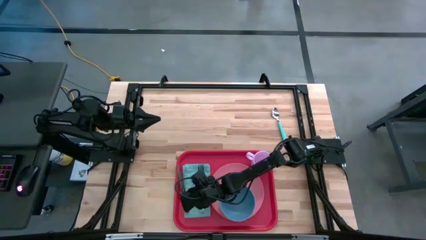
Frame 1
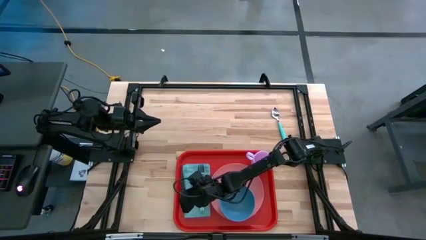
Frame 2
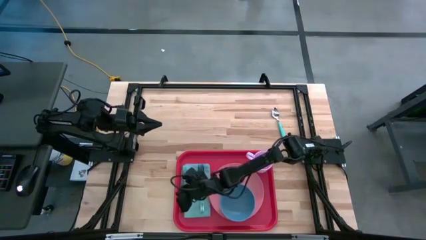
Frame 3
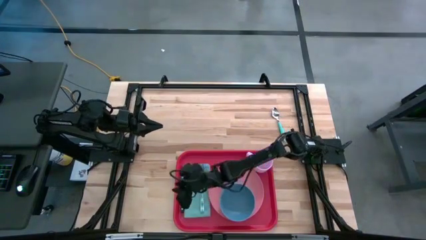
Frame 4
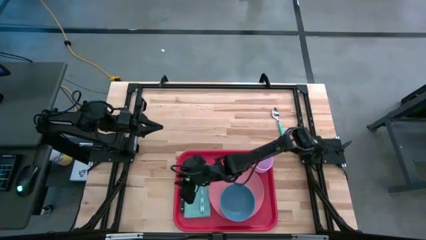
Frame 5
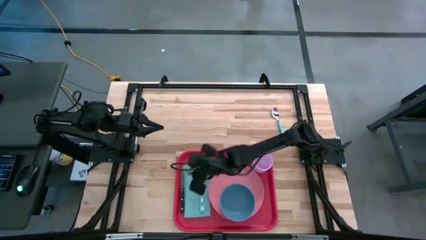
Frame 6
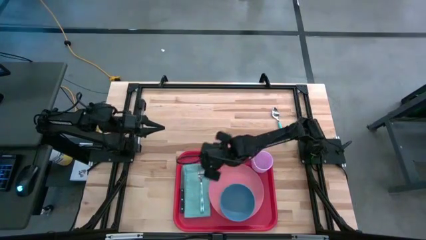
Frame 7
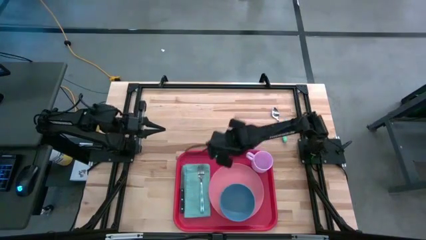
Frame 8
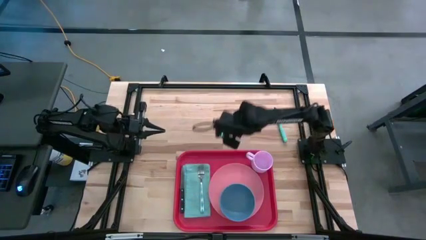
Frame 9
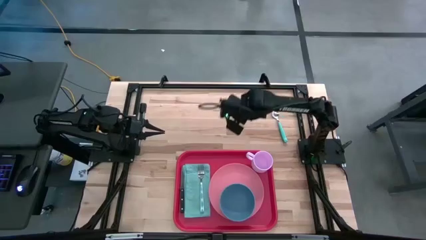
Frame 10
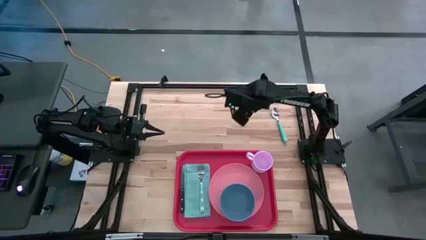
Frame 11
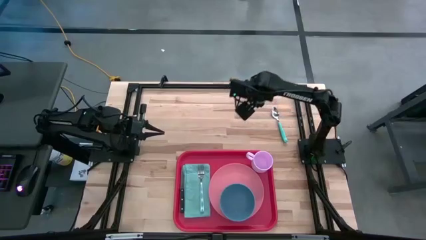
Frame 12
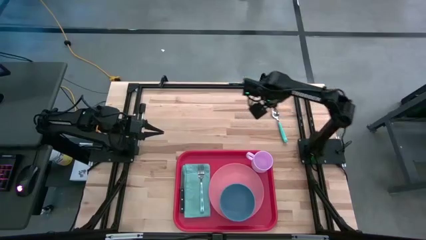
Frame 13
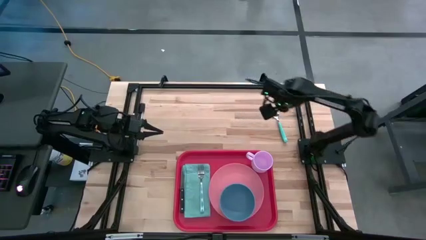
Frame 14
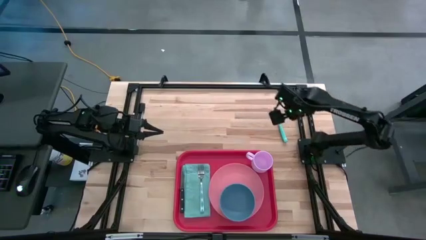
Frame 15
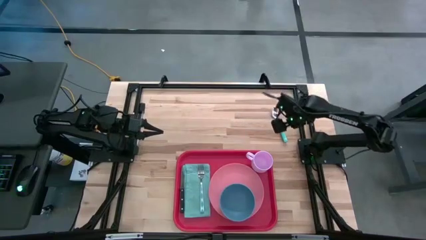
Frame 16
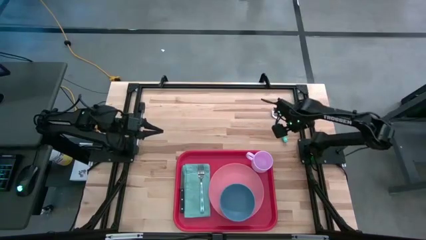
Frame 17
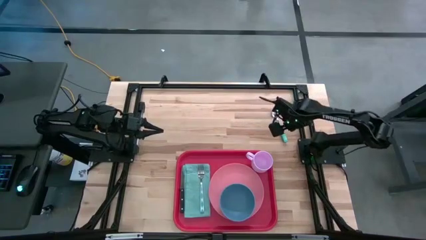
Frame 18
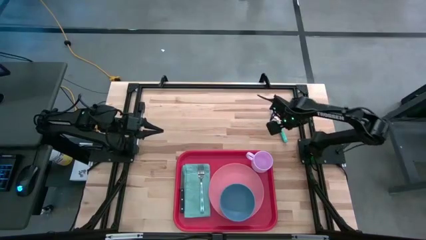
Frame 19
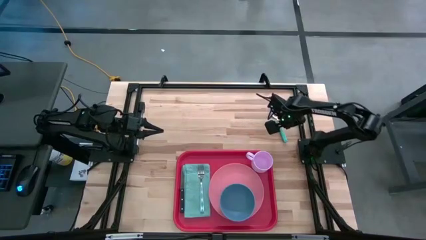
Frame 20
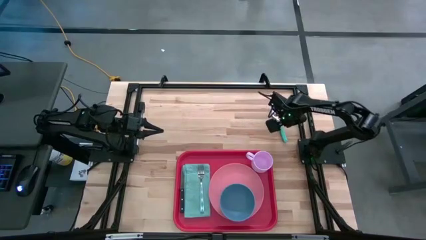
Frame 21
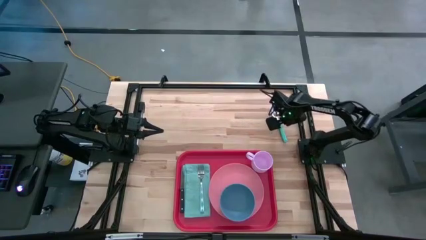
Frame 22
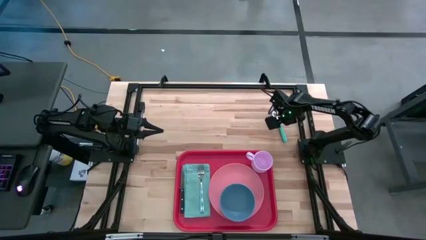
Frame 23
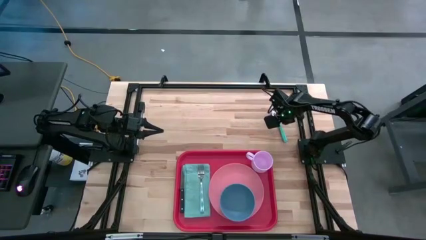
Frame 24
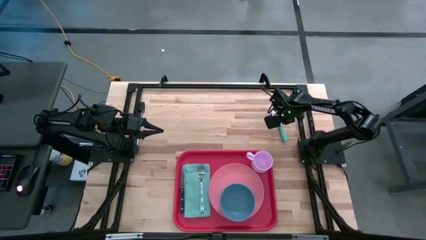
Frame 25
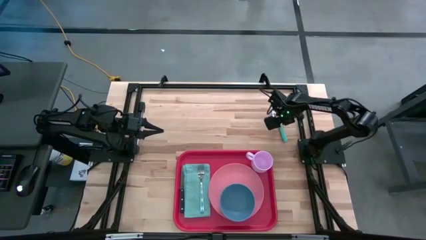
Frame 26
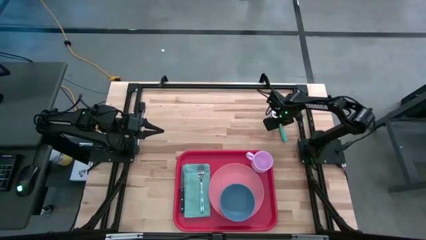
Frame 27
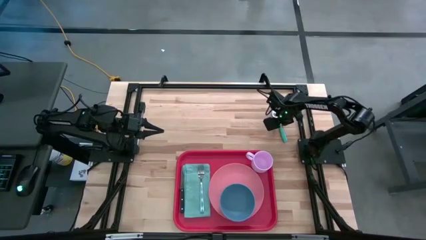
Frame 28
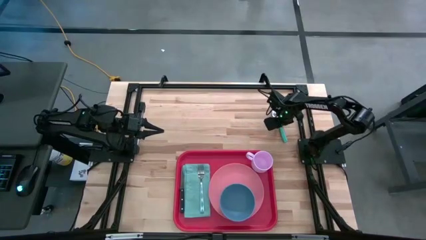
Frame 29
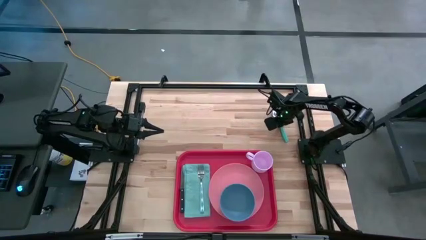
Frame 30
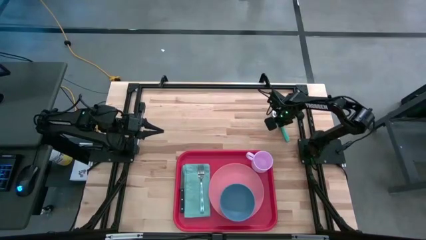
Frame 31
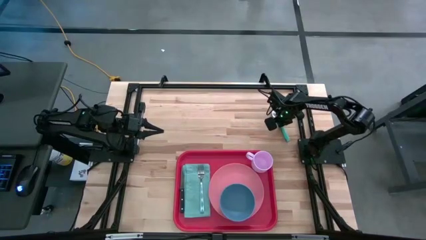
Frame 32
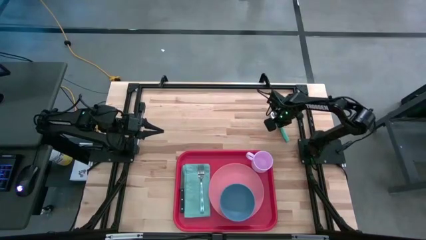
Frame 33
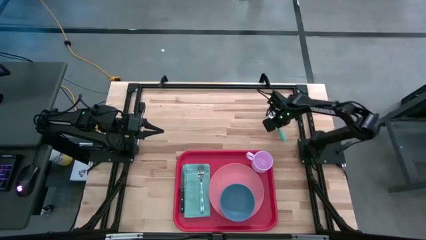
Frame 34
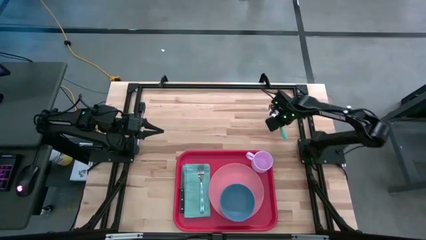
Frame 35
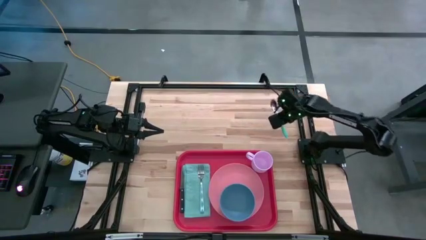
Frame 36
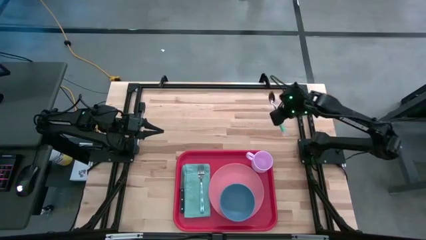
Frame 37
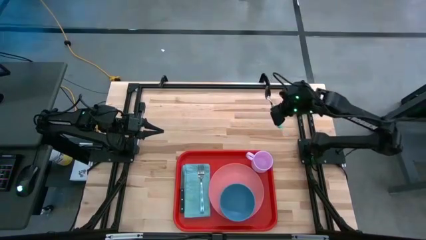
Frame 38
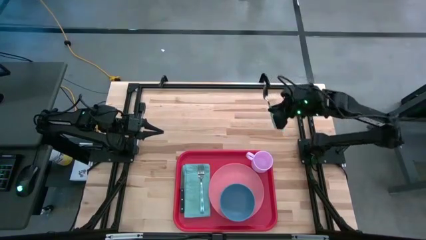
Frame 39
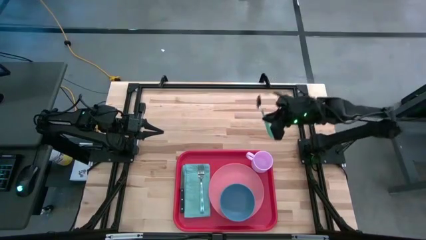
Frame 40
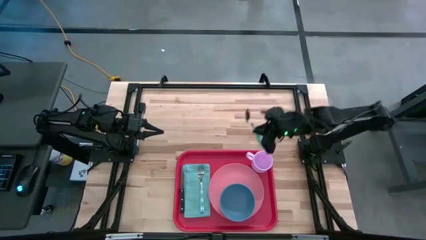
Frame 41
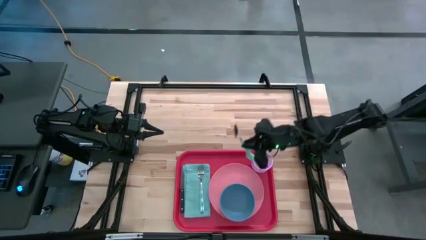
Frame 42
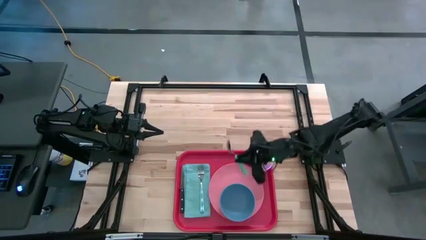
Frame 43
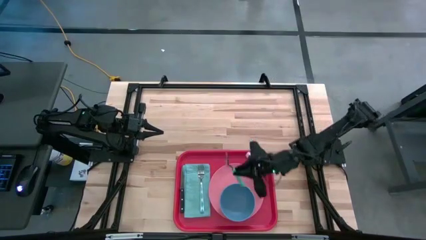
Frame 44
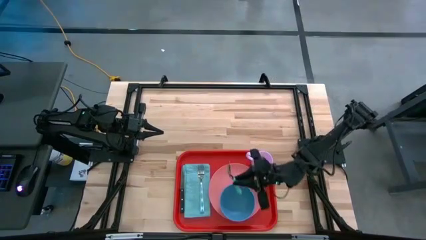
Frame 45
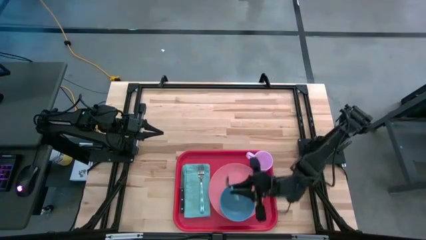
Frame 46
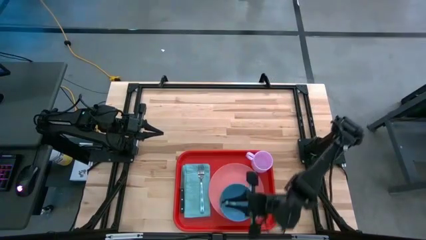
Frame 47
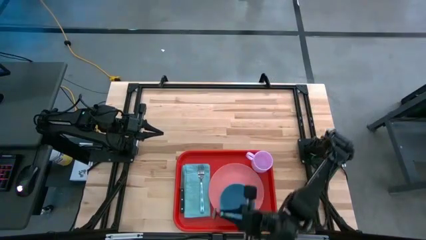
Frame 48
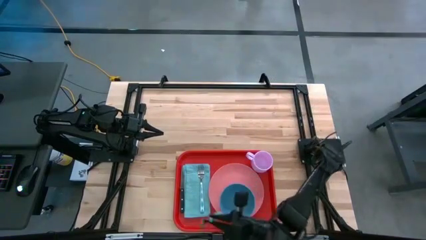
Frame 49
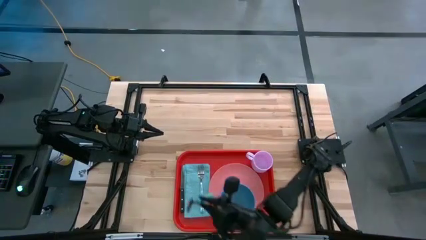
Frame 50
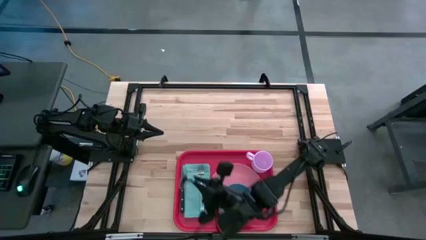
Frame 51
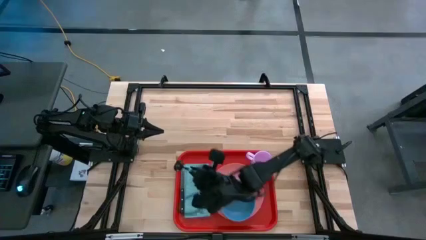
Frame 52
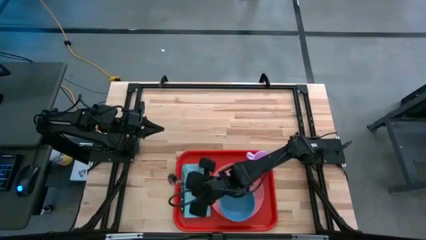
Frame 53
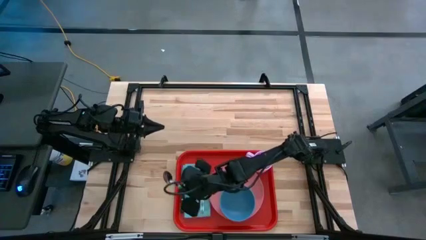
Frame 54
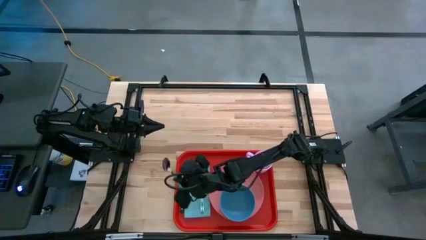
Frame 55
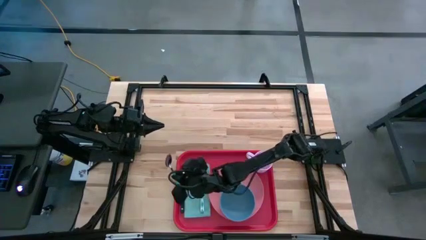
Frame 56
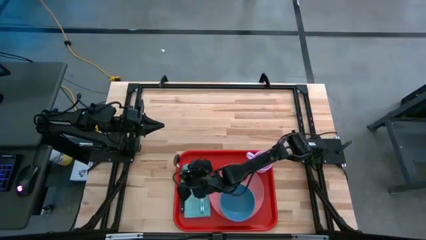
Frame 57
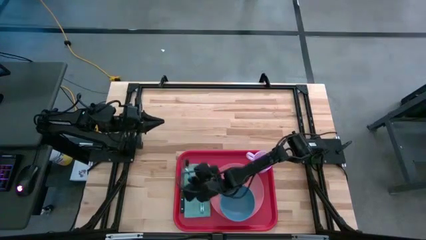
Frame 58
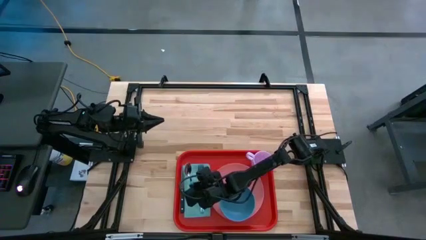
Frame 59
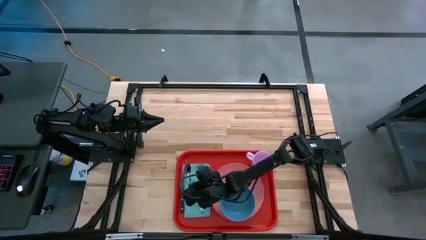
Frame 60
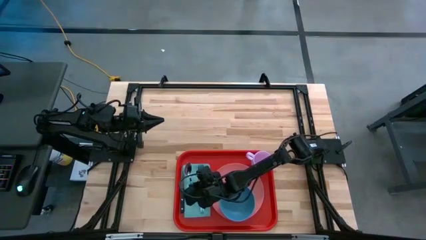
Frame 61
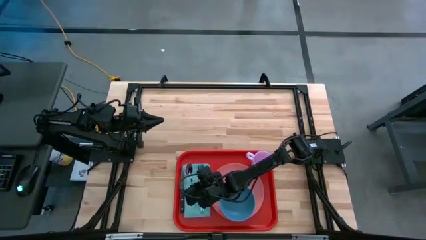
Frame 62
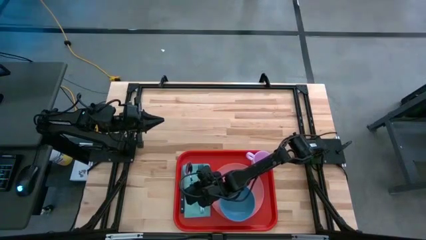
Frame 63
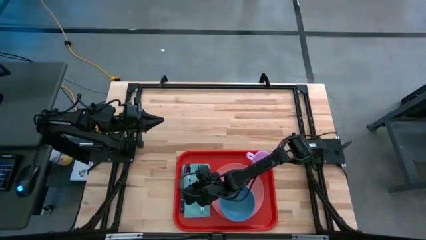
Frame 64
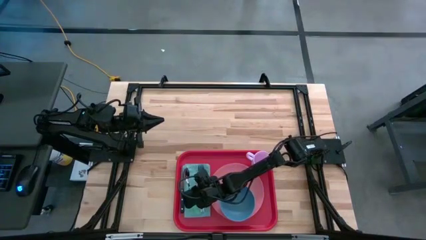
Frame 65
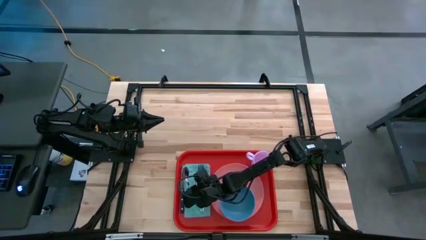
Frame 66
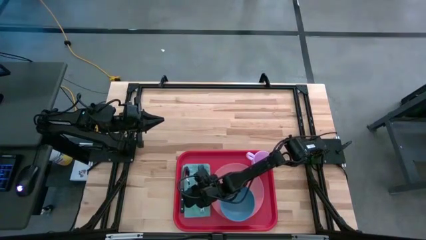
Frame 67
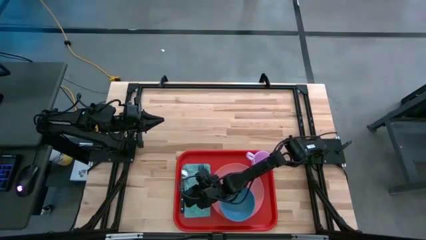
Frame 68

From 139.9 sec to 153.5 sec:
Task: Set up tray
Put the blue spoon on the blue napkin beside the black knife

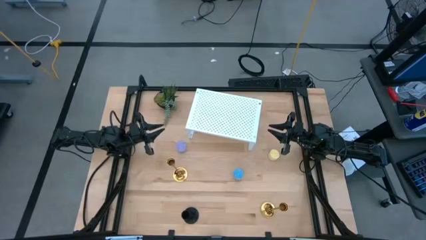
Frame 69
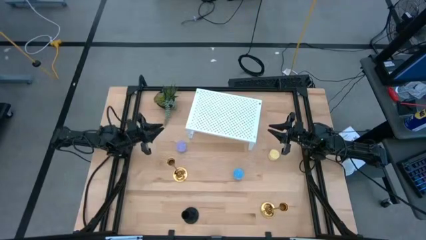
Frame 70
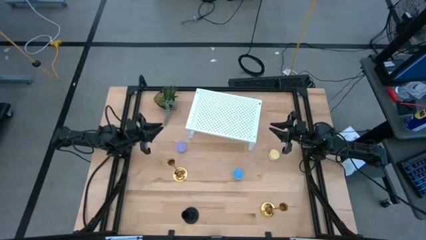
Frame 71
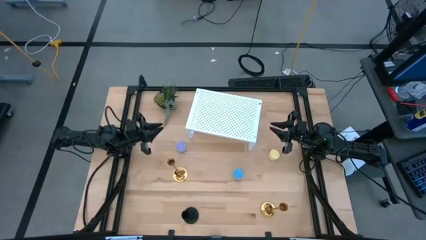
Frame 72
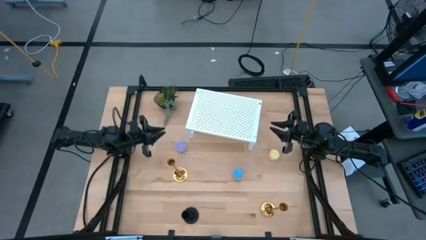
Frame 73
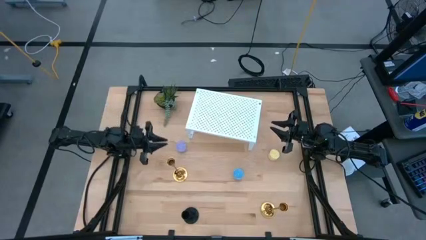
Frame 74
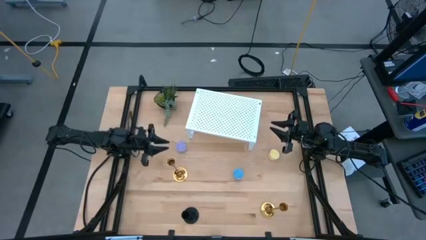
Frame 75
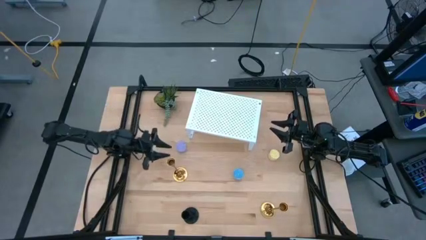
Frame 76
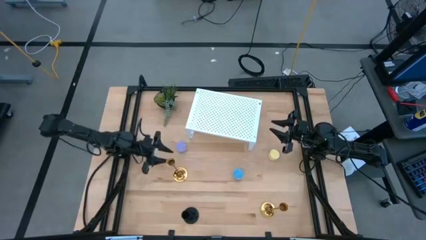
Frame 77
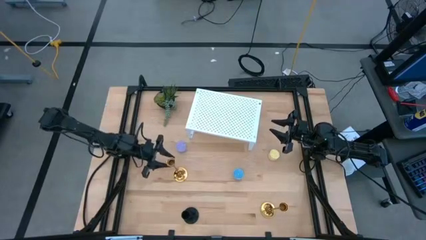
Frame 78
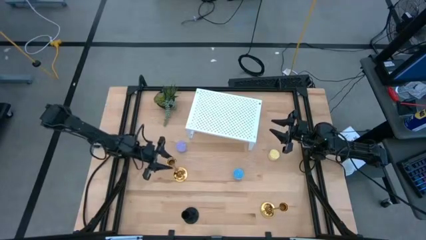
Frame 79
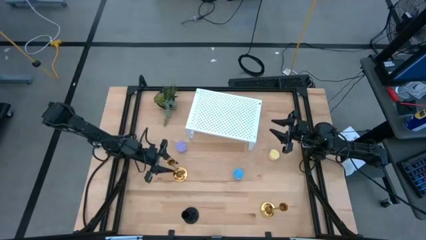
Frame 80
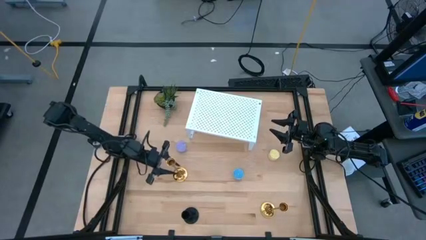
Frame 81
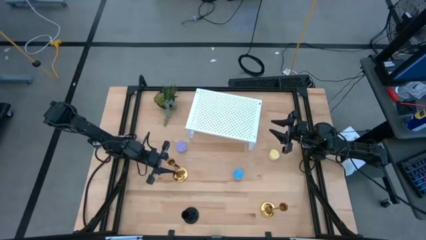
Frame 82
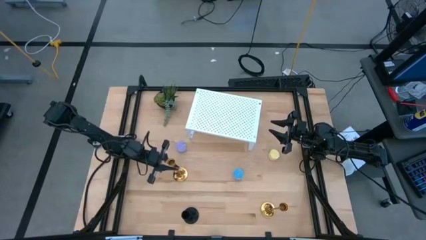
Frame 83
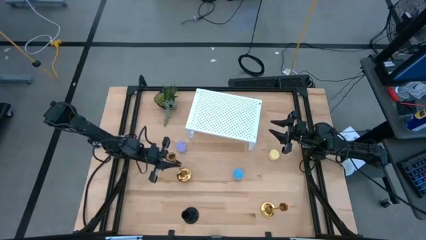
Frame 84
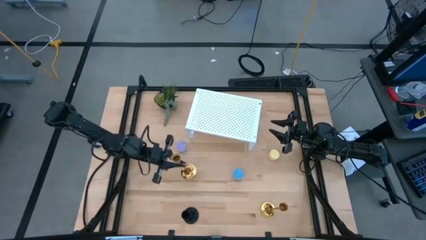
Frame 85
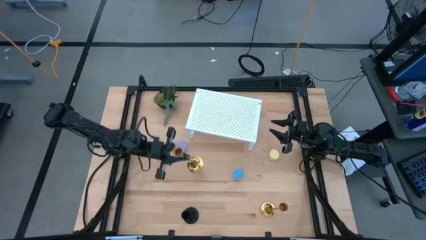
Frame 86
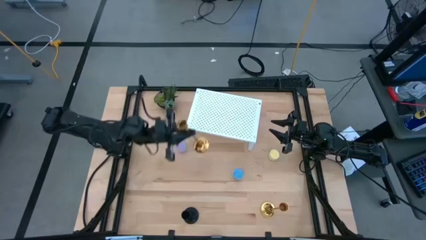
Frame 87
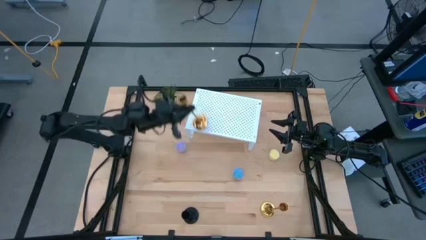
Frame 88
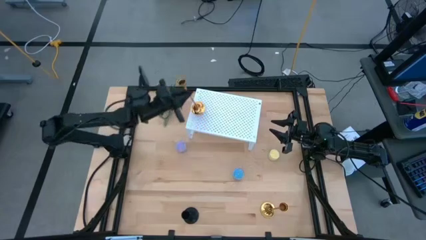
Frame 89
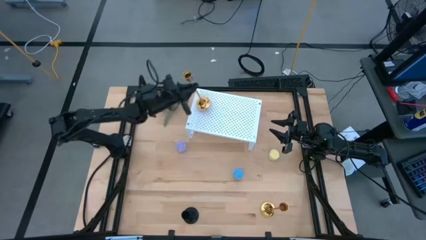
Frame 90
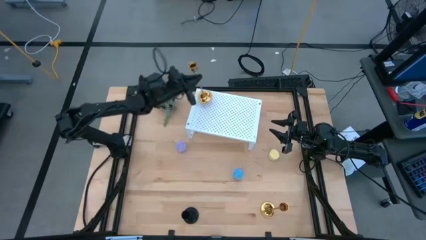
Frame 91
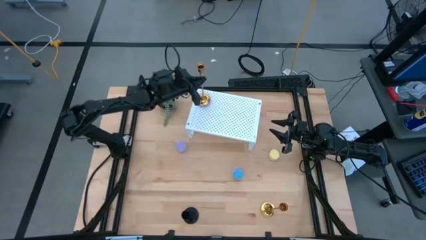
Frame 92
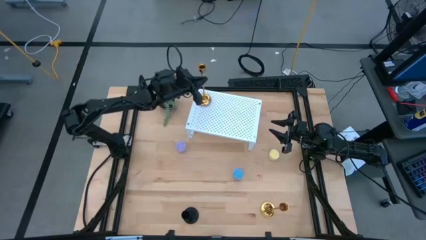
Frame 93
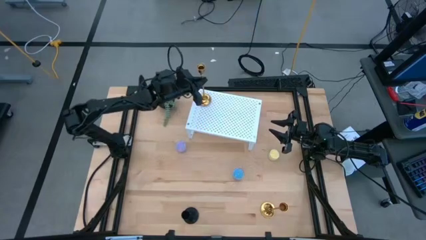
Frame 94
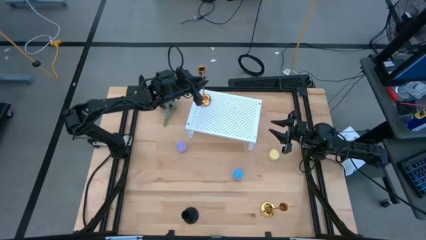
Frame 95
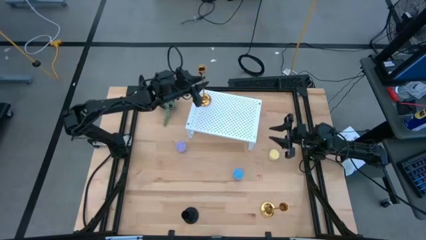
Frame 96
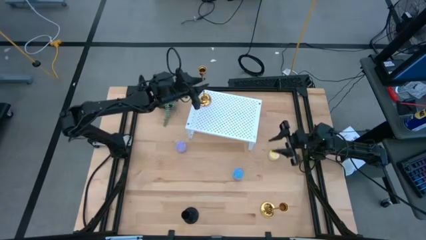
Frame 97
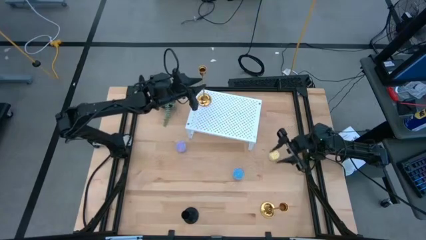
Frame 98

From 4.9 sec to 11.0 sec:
Task: Pick & Place candle stick holders
Put the top gold candle holder on the shelf
